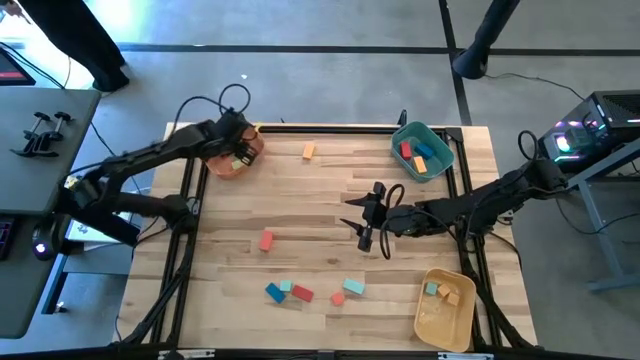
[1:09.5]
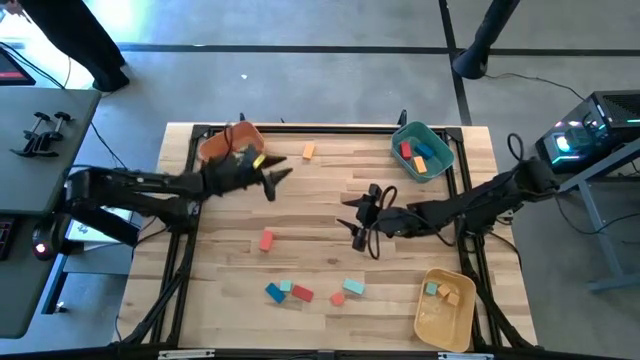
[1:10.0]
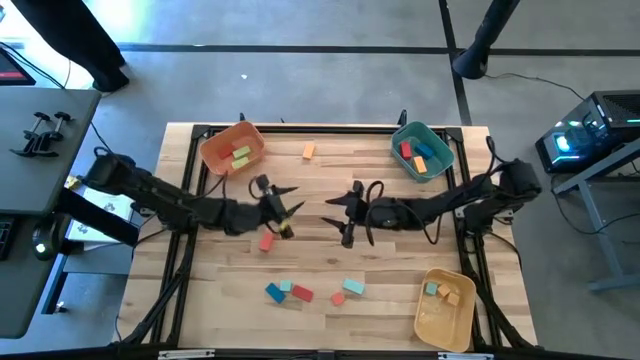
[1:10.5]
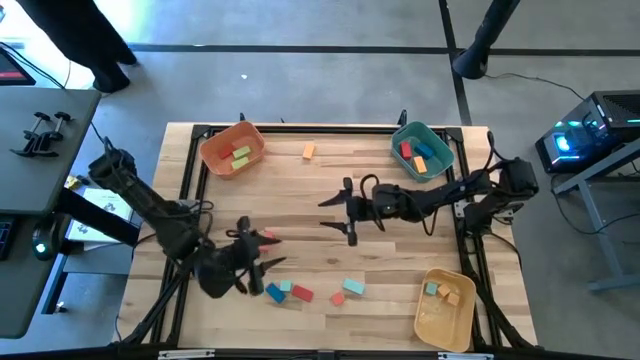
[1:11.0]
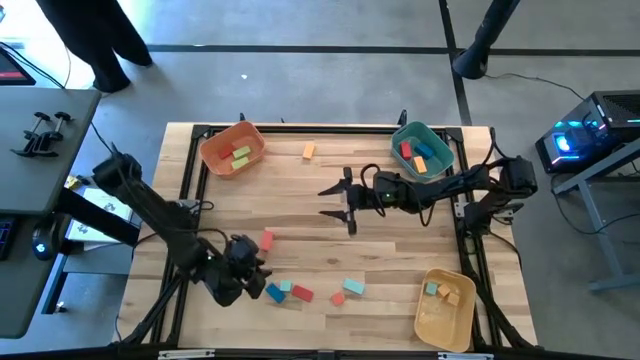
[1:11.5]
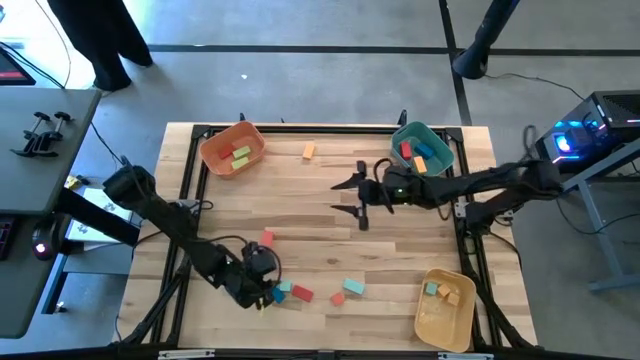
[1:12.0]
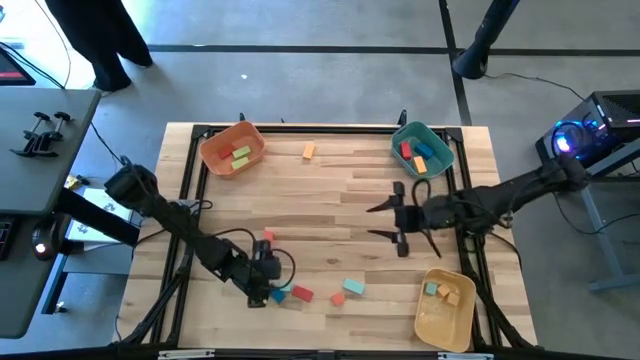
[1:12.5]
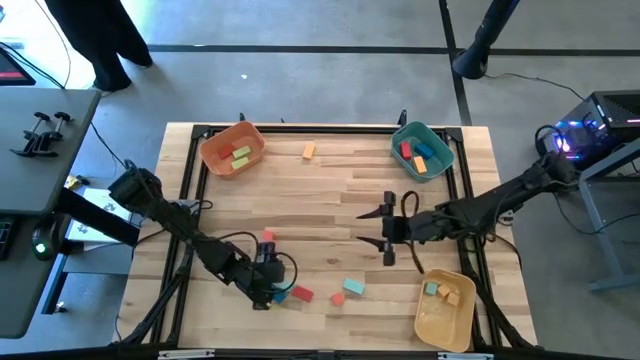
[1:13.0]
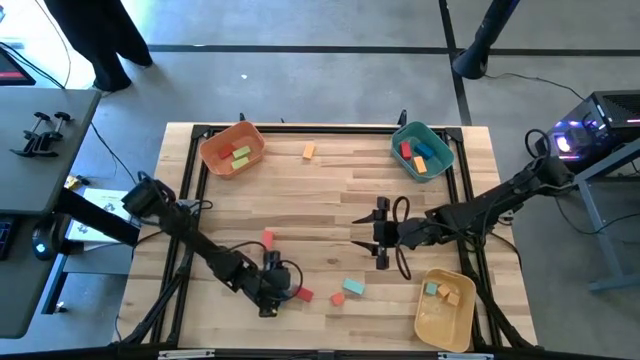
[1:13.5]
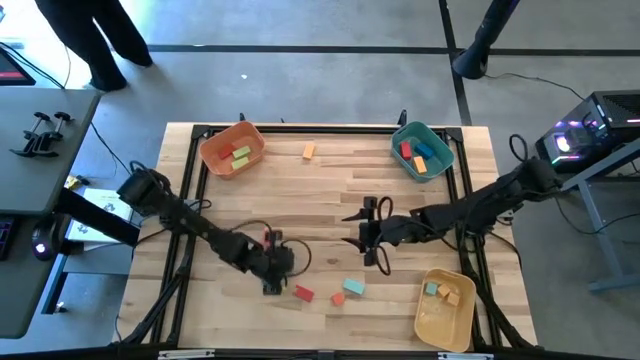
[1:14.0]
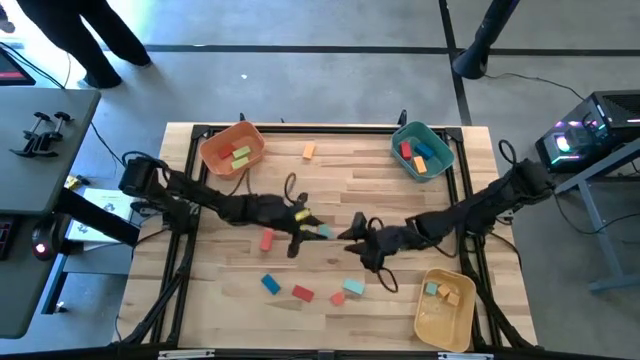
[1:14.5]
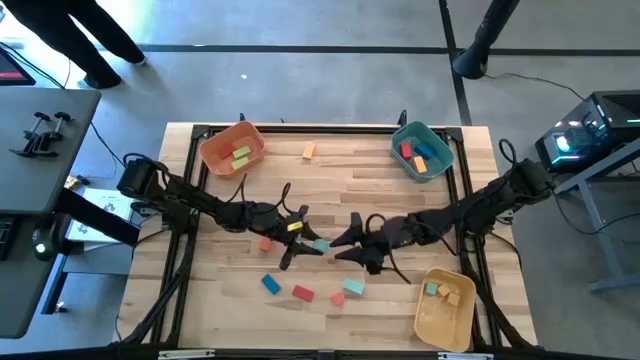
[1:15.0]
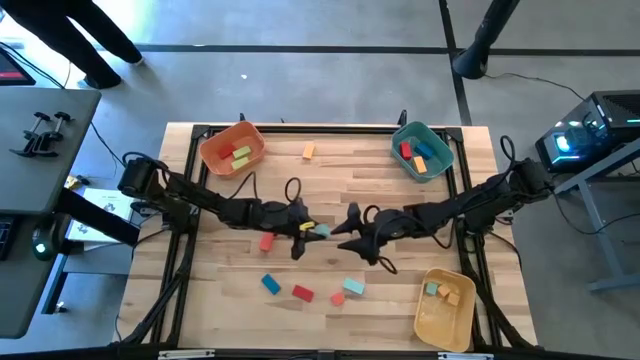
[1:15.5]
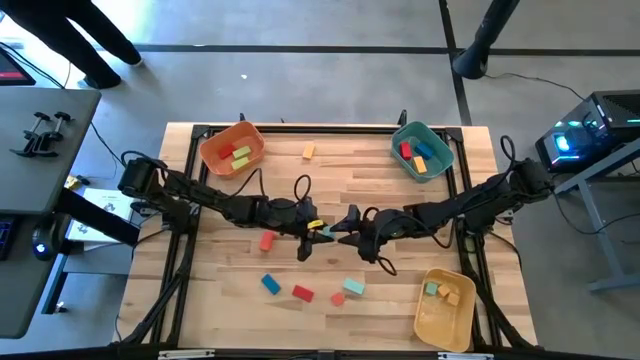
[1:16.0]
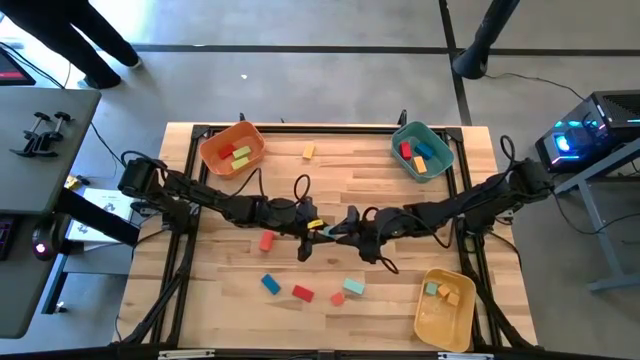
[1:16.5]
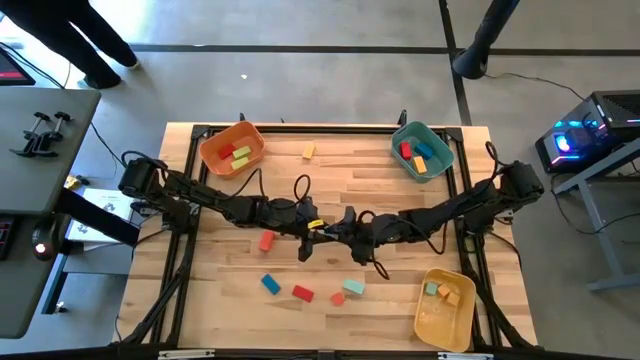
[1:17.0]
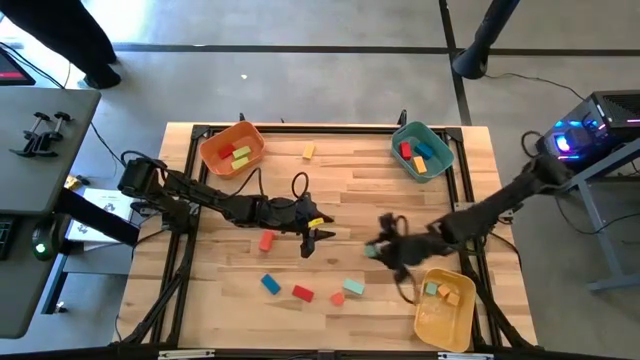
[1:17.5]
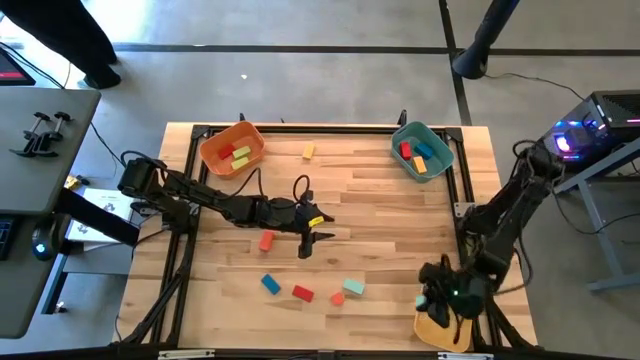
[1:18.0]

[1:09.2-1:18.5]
Task: Sort blocks by size
Put the light blue cube block into the yellow bin

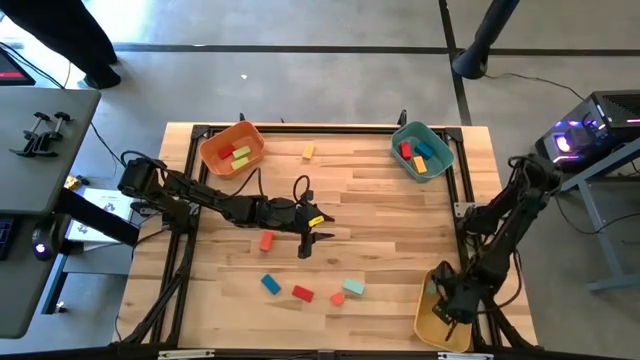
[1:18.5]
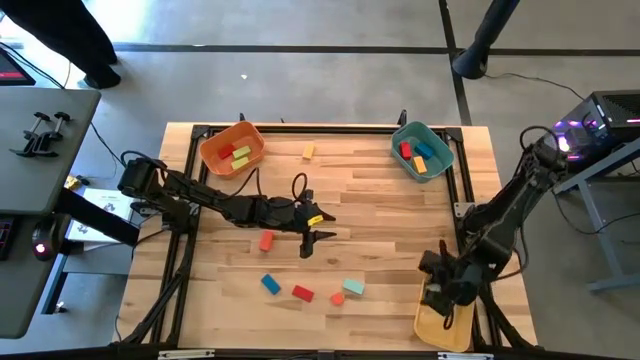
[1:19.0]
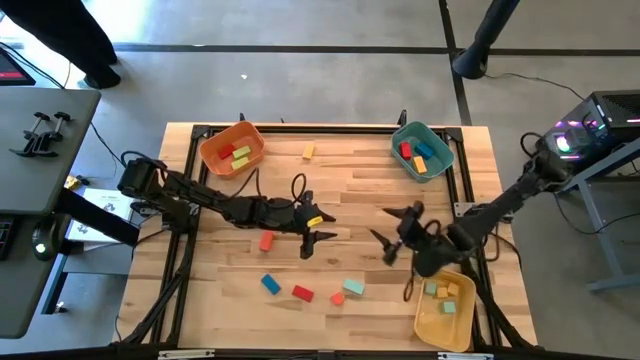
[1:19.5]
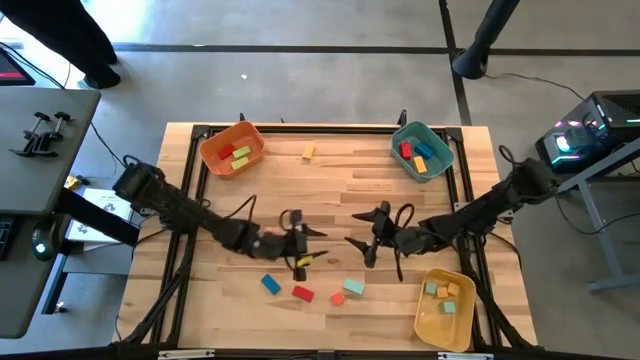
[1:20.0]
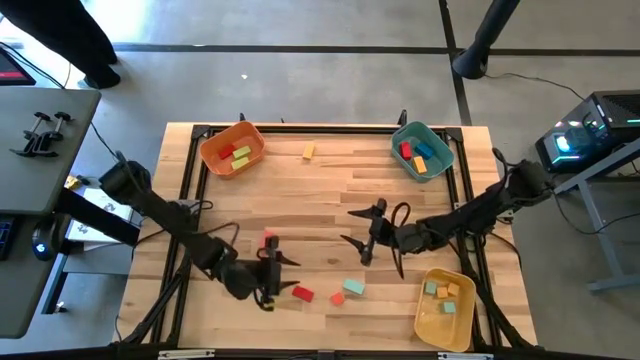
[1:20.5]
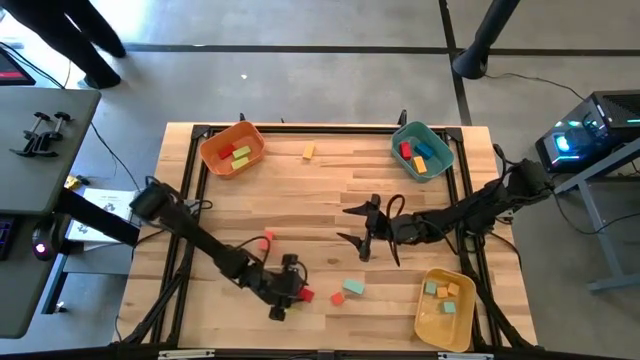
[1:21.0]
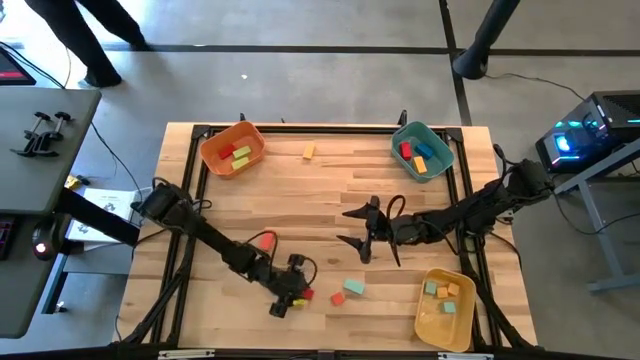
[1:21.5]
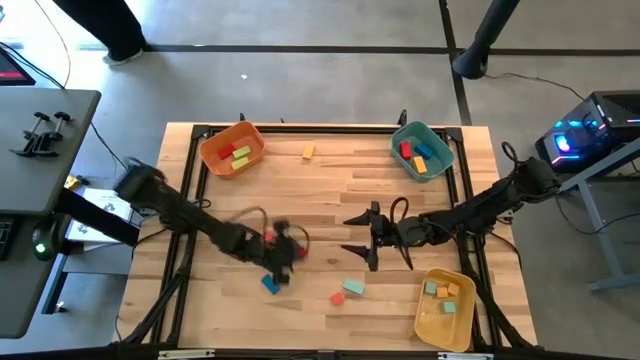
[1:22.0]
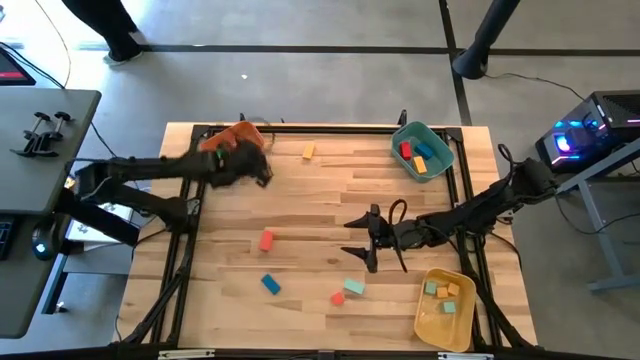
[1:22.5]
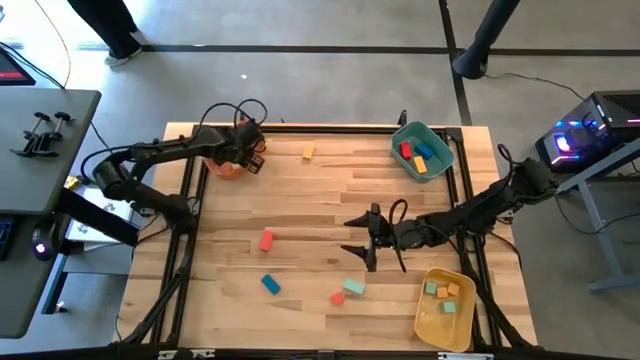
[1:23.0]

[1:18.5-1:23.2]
Put the thin red rectangular block into the orange bin

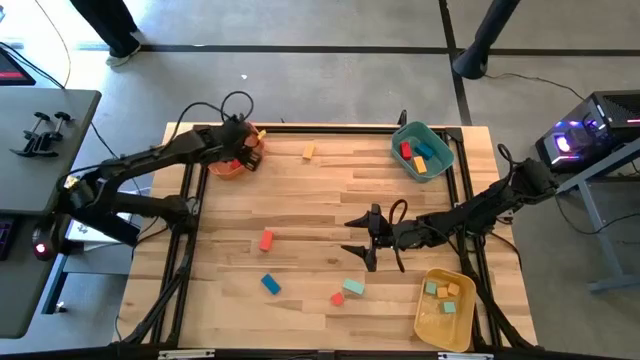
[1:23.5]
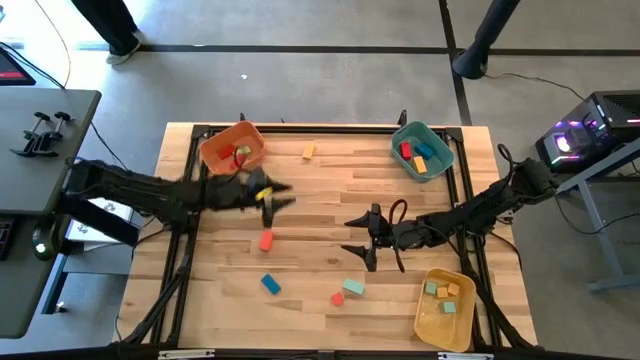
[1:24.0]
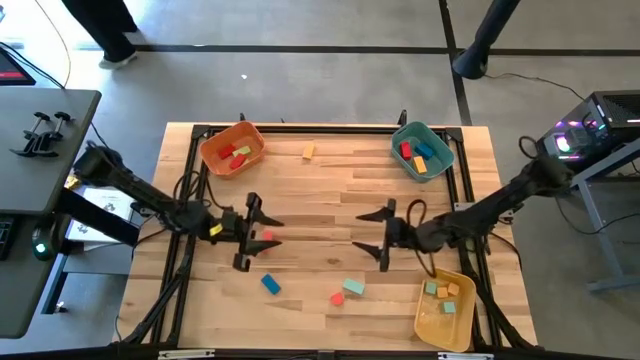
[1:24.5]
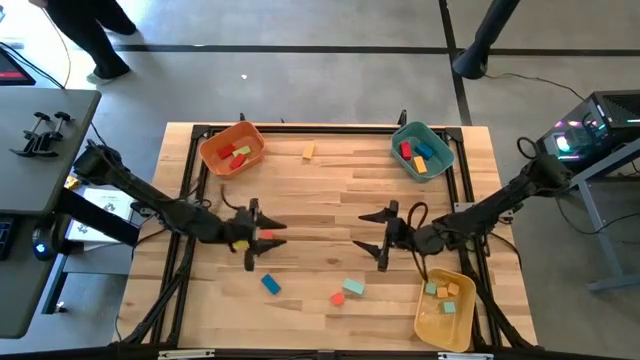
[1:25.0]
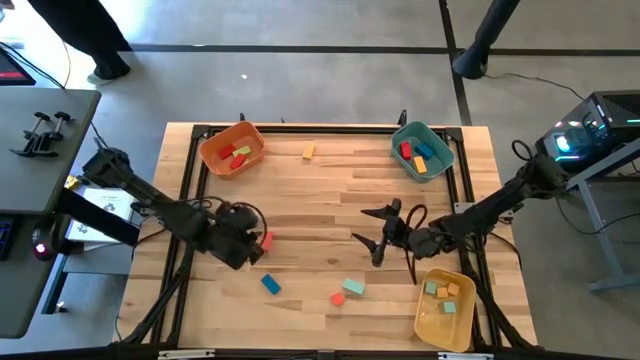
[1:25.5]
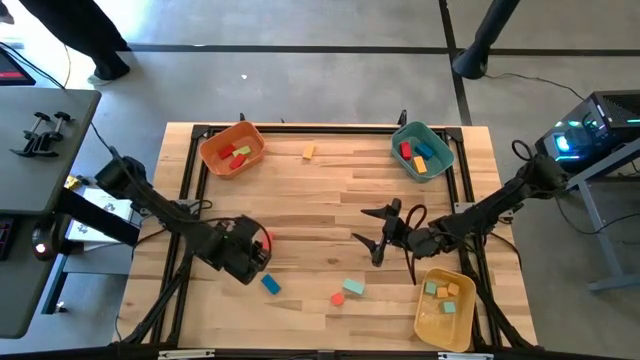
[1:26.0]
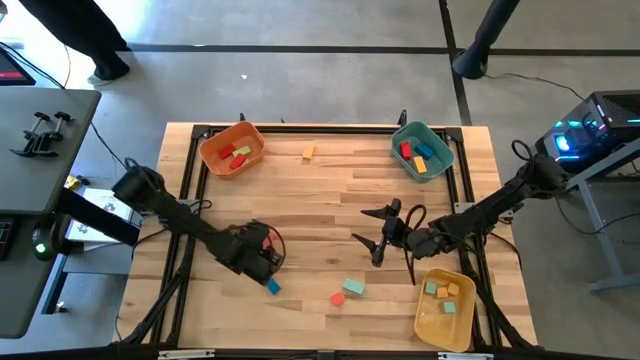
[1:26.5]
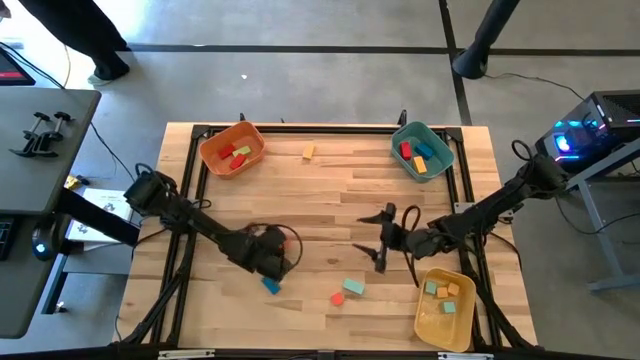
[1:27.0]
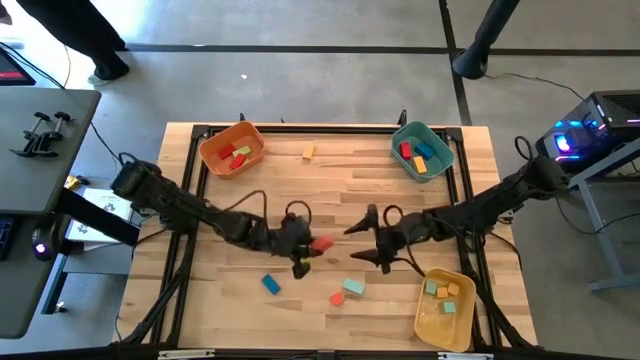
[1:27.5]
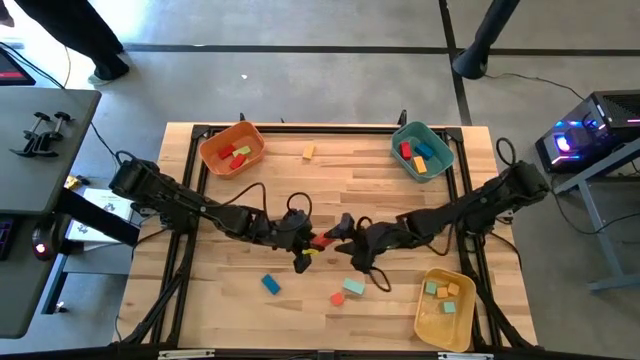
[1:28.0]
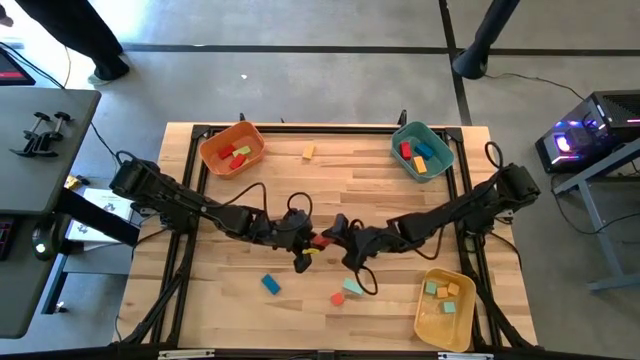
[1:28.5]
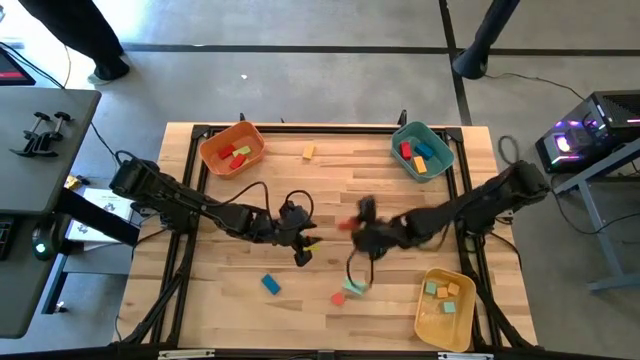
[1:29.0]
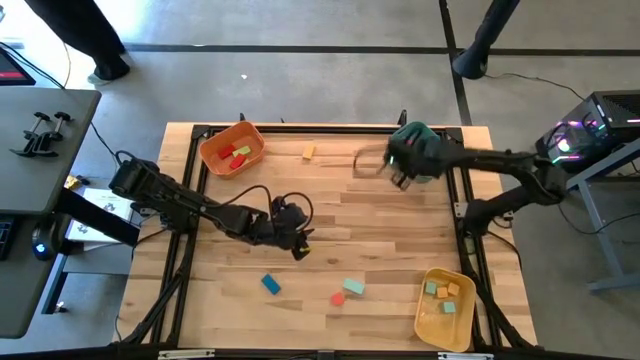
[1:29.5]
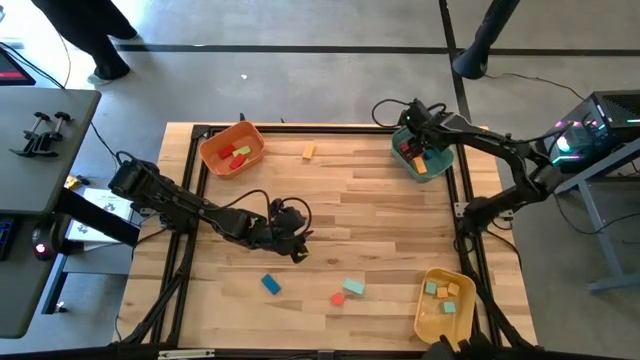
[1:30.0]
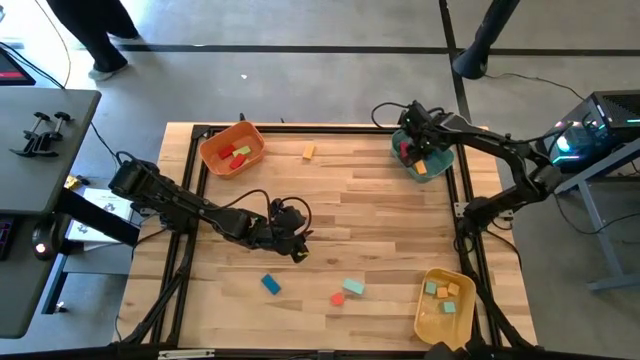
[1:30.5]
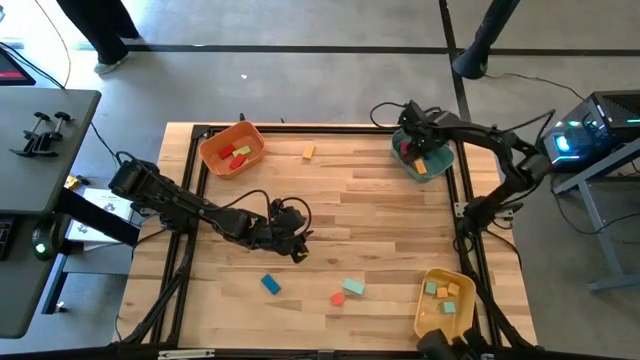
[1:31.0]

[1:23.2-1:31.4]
Put the thick orange rectangular block into the green bin
